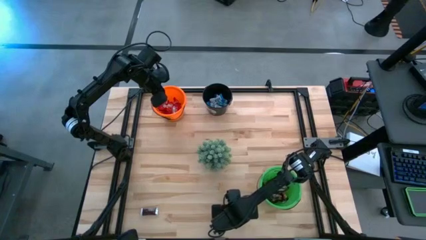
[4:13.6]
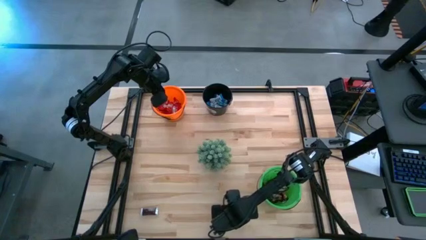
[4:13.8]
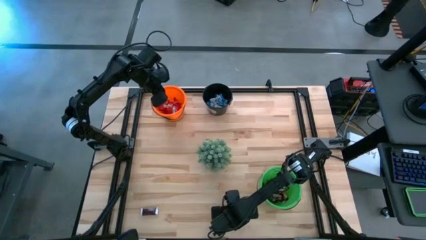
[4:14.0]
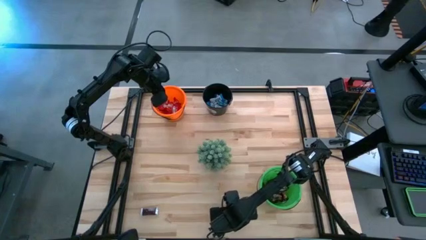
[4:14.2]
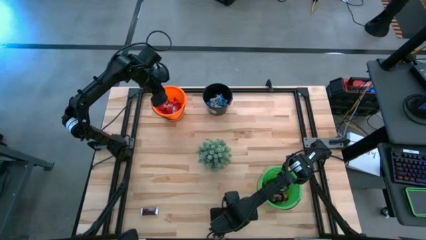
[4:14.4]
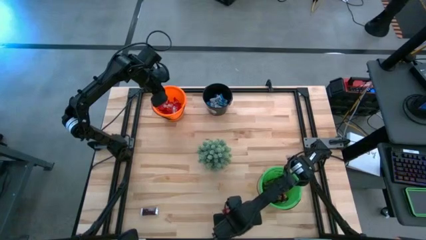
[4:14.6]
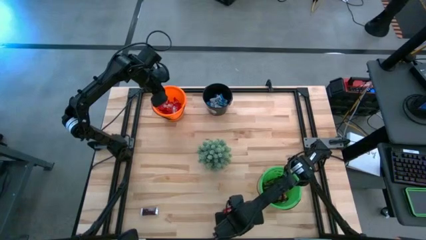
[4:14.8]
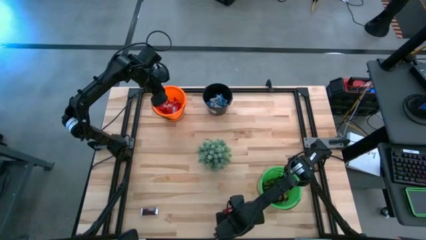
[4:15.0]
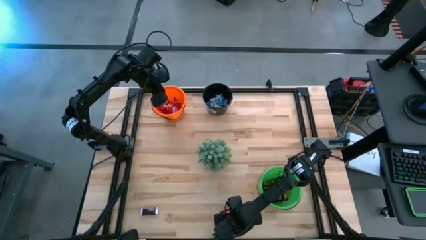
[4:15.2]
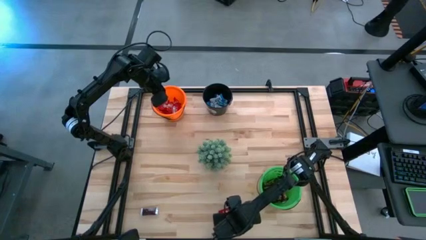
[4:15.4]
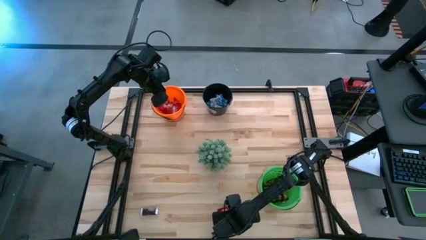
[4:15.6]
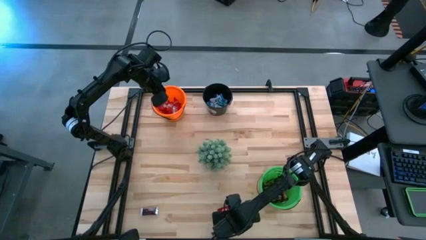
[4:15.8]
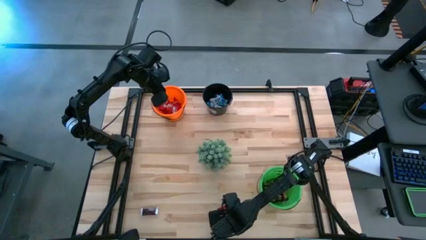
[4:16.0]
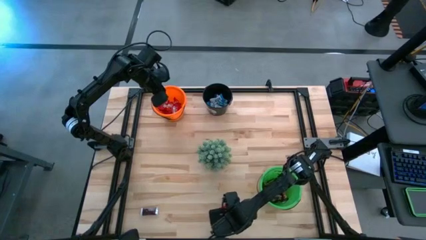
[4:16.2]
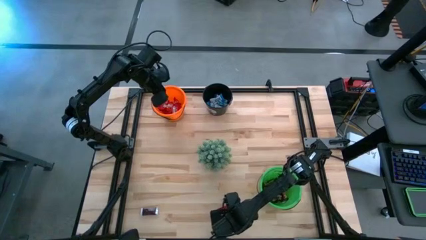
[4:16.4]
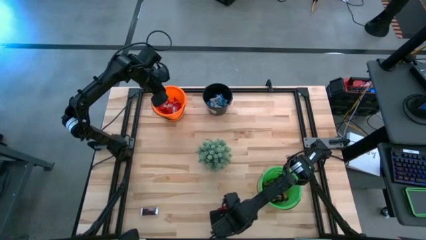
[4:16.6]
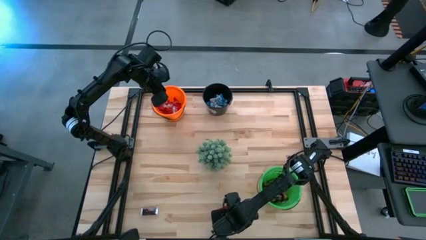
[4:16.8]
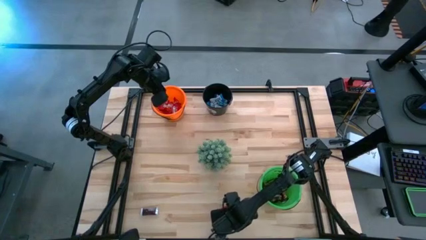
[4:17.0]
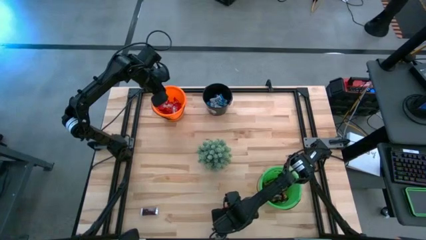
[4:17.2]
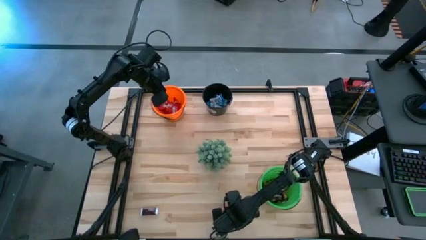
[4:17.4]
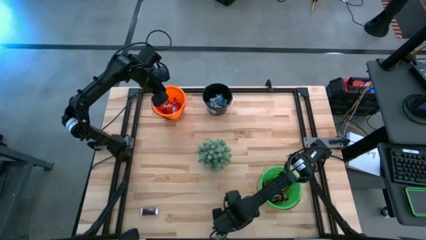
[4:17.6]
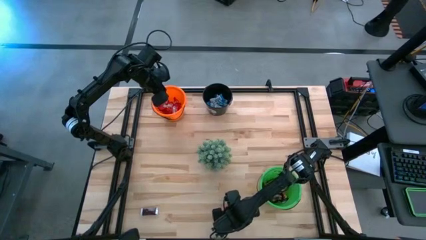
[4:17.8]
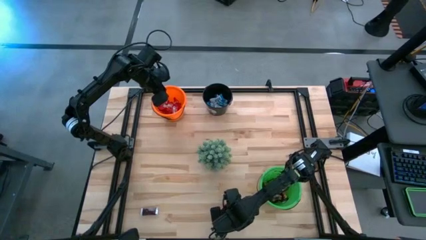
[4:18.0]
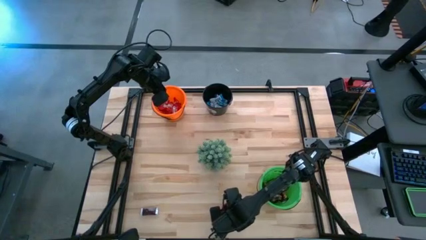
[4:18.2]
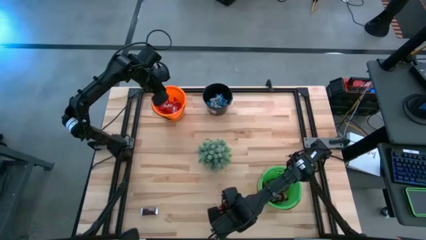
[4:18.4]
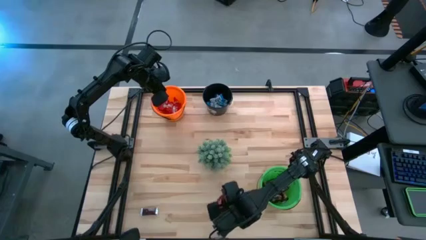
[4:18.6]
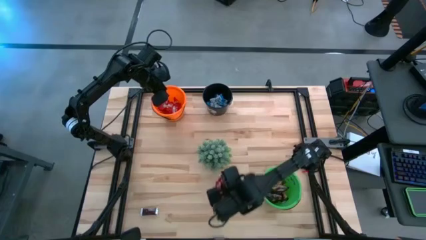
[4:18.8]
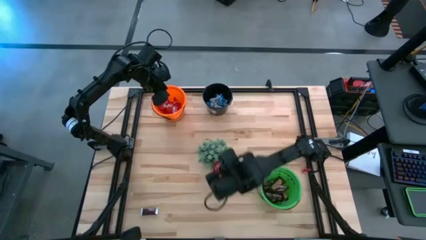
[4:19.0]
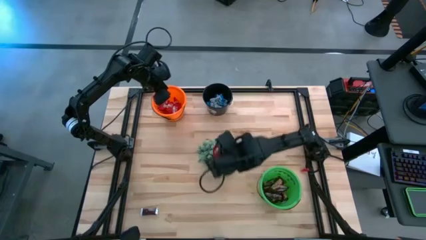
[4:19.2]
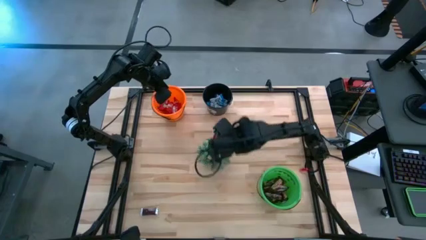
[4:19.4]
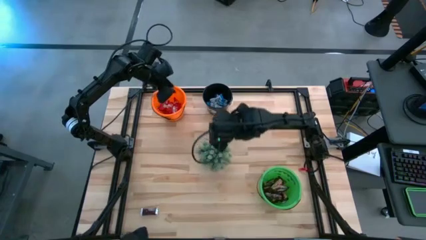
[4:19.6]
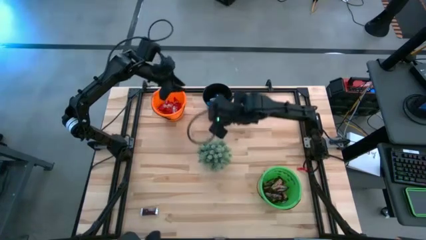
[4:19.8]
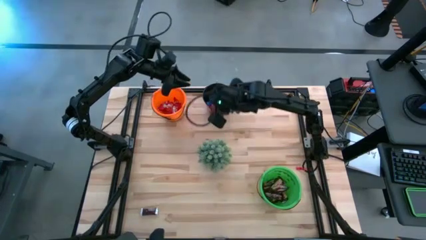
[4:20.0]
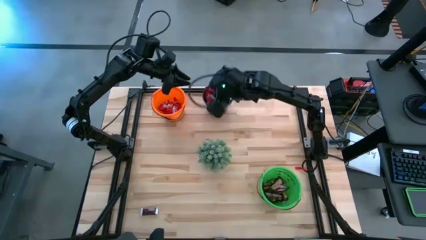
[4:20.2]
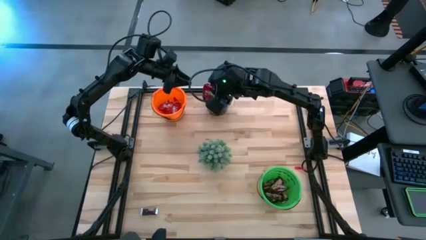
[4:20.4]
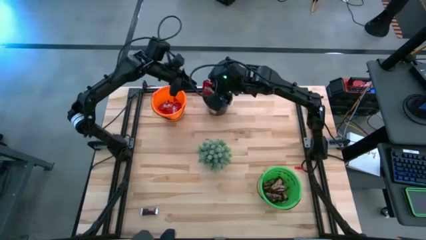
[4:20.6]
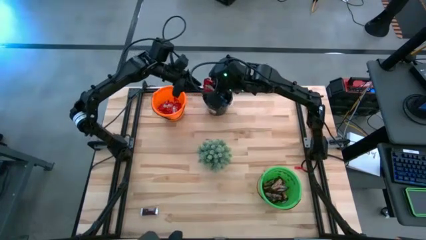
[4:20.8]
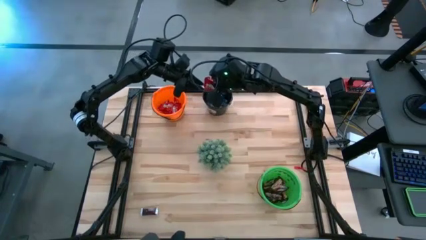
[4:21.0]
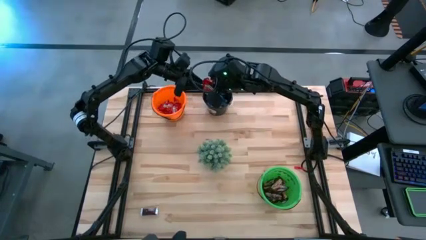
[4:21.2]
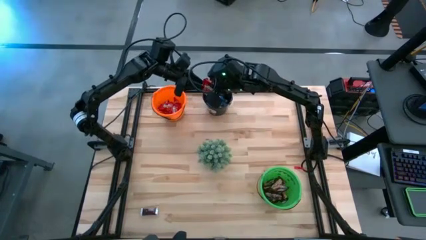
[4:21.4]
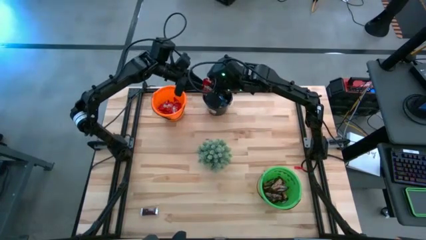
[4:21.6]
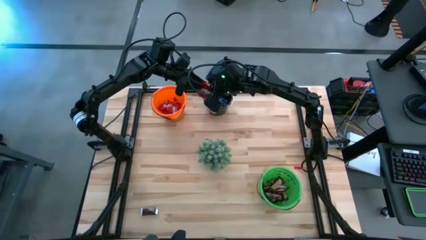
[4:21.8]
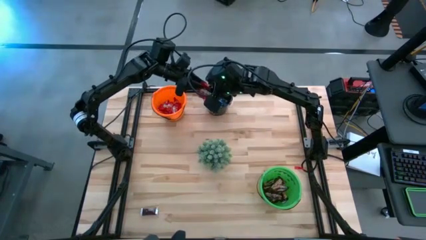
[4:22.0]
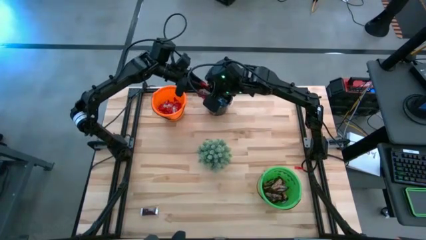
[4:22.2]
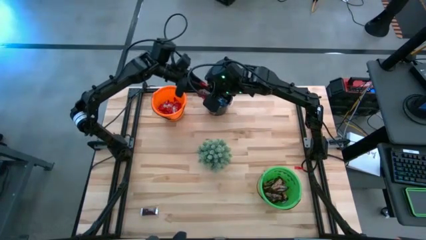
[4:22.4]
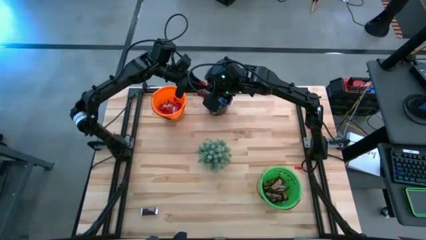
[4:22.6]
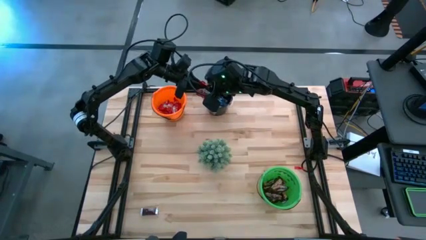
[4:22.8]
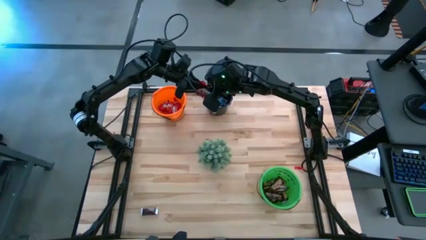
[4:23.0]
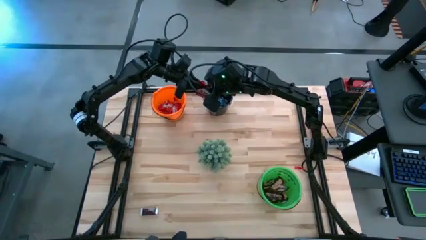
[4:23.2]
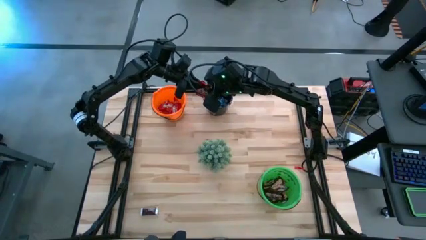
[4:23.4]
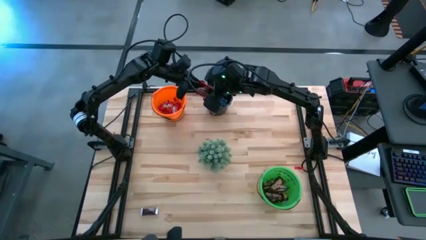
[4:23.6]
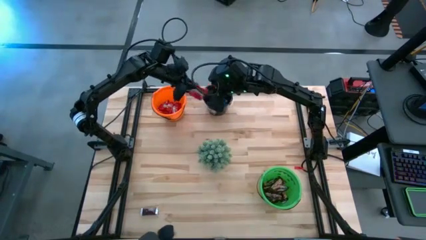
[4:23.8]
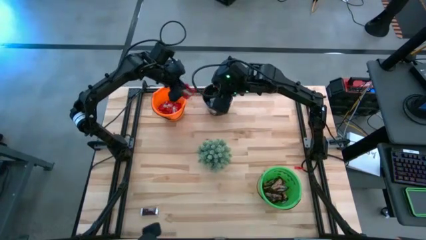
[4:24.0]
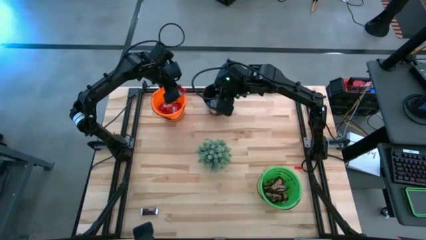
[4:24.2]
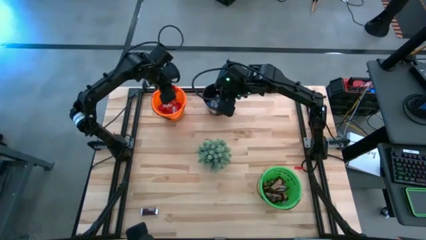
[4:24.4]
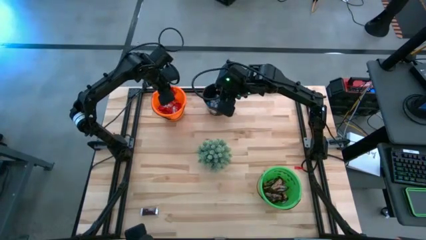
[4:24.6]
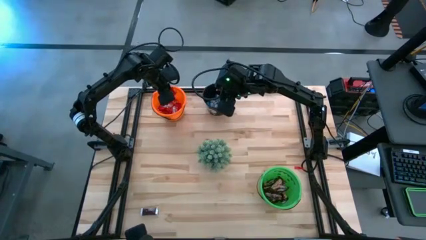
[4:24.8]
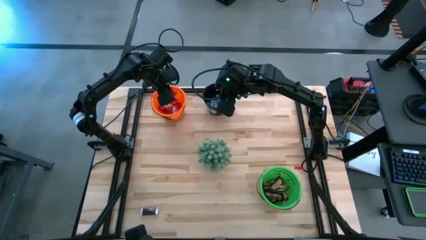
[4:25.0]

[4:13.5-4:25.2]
Task: Organize candy in baskets
Put the red candy into the orange bucket

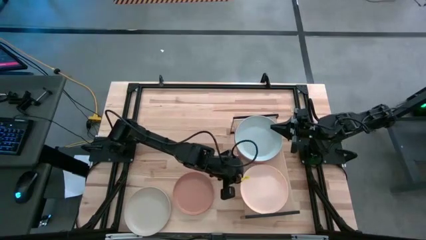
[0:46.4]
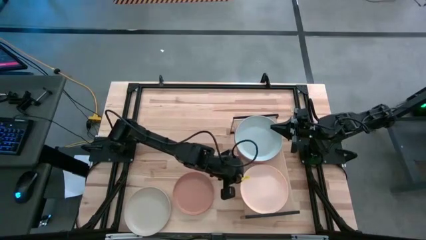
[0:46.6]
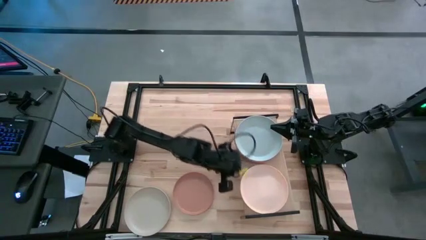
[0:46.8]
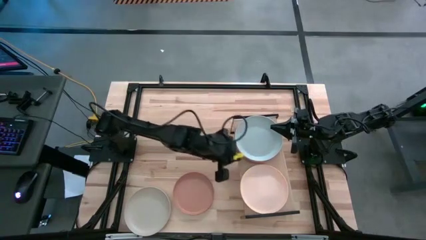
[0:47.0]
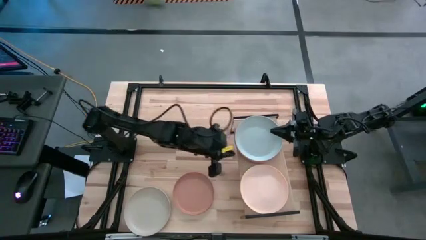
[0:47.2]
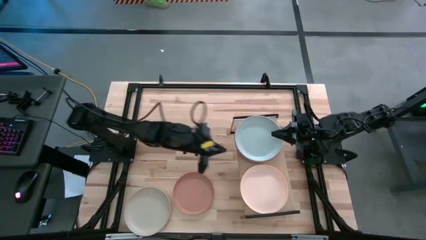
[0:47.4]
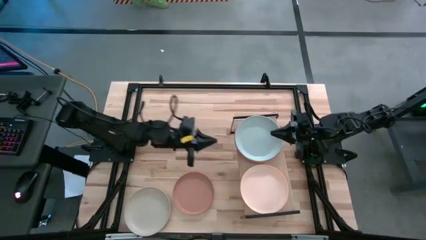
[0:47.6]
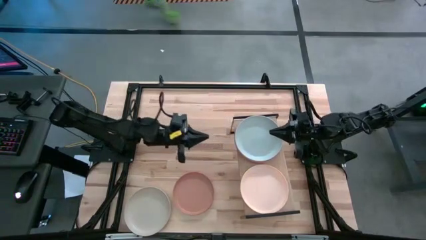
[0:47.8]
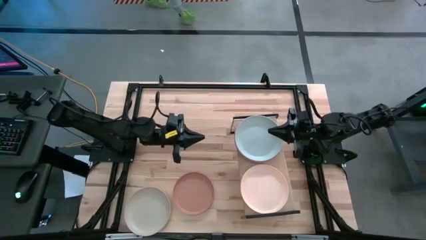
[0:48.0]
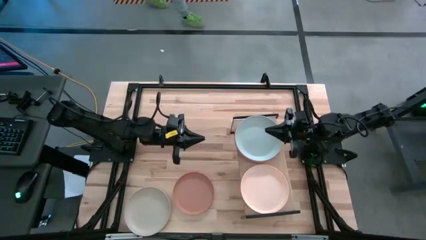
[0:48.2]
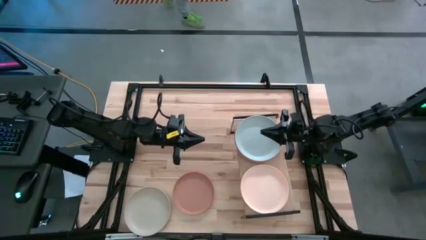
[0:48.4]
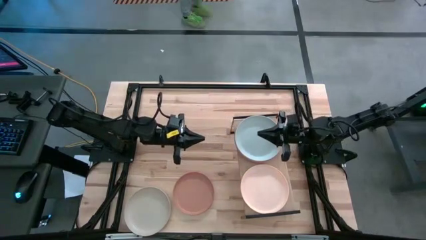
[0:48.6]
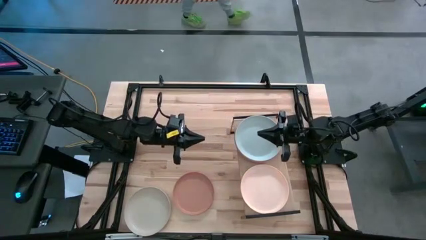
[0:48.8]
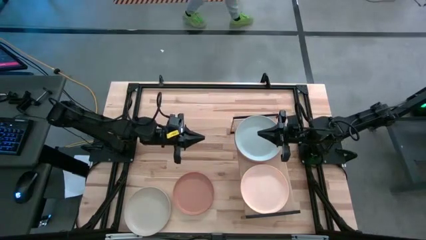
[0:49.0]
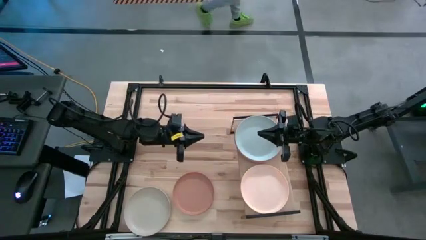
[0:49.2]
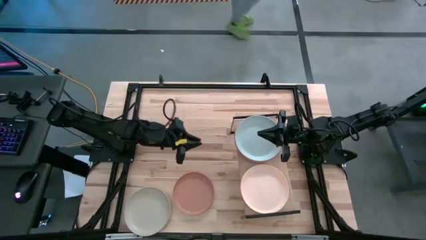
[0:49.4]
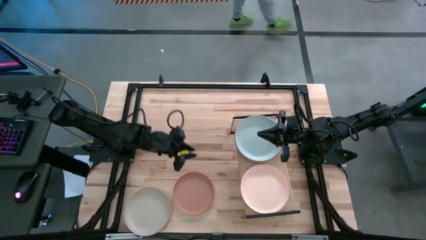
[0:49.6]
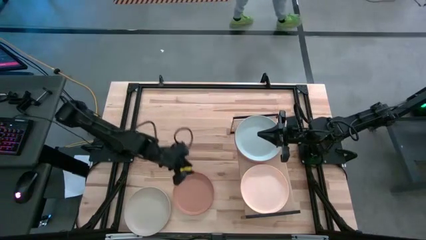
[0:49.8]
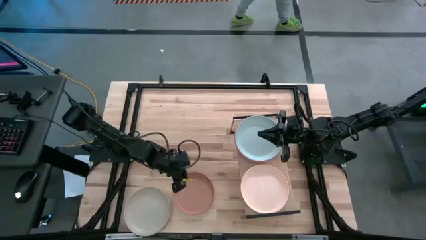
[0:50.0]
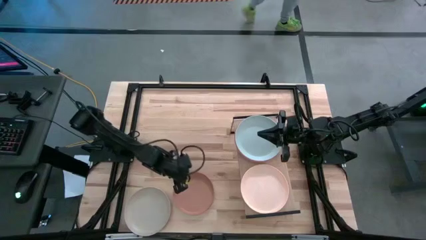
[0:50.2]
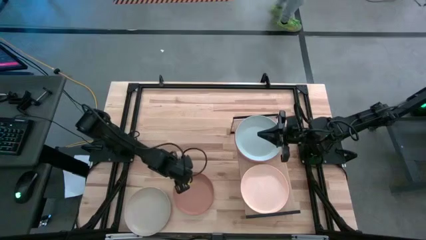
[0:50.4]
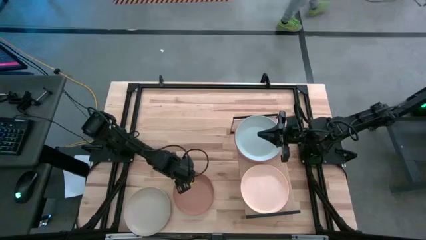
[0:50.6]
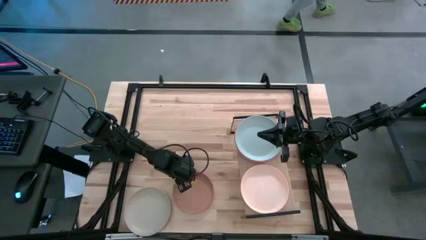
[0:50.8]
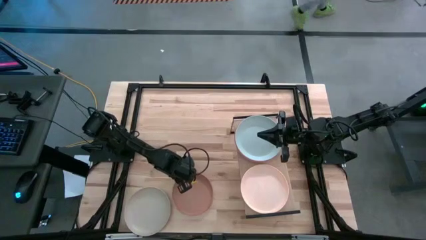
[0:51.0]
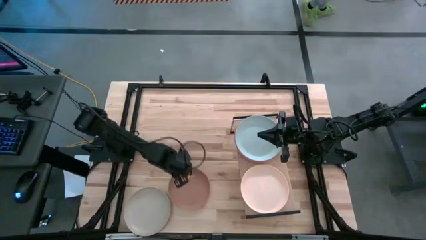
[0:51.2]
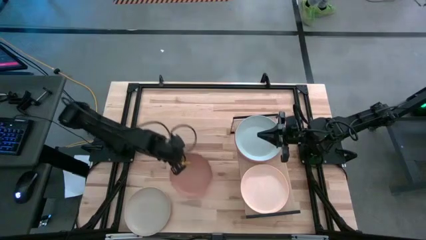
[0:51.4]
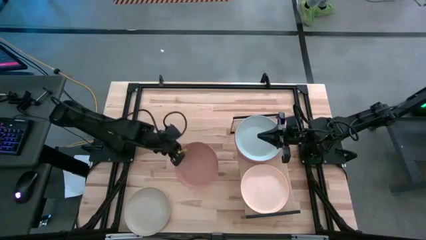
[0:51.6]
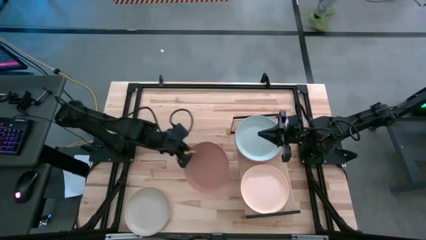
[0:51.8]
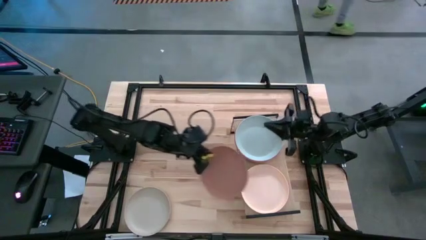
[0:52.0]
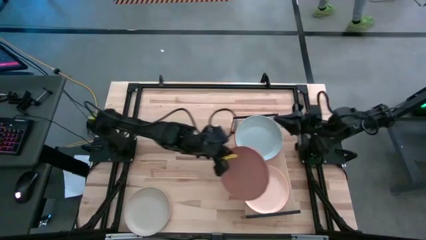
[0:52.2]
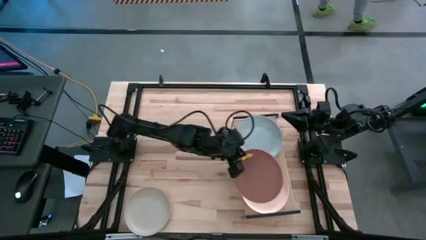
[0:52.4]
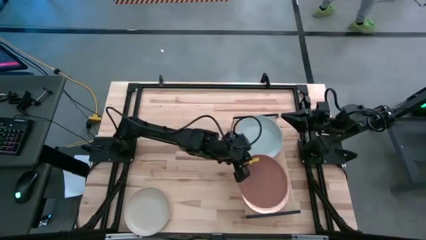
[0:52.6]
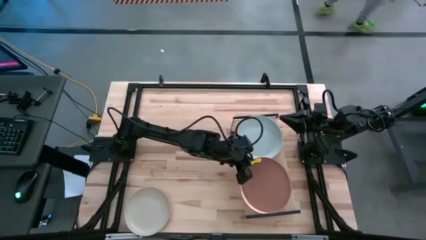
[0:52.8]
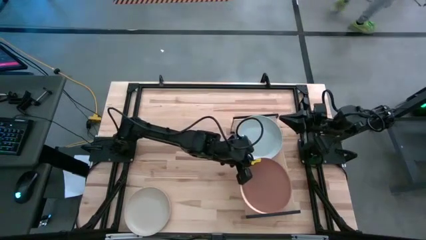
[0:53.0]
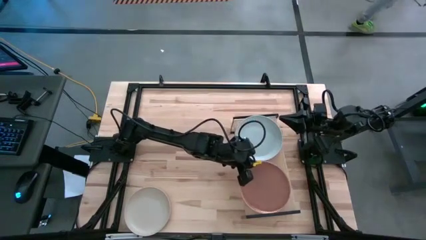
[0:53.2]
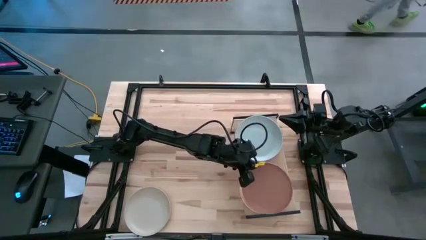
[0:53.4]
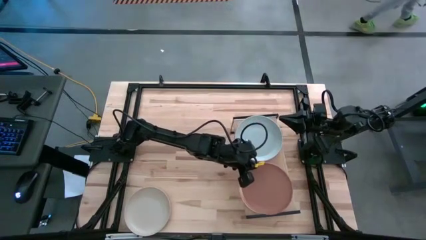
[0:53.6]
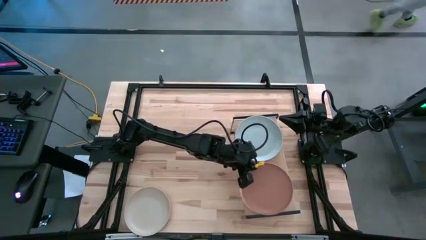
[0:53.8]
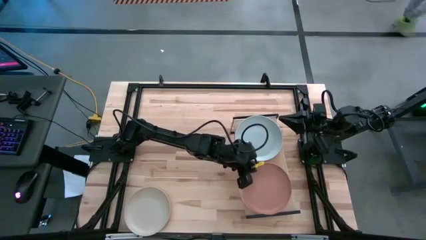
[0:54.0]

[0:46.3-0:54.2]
Task: Place and stack plates onto a shelf
Stack the brown plate on top of the light orange plate on the shelf
